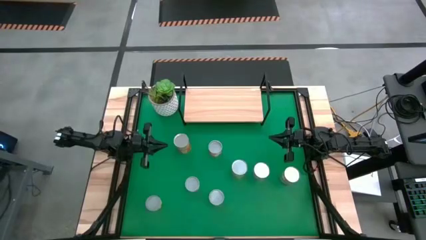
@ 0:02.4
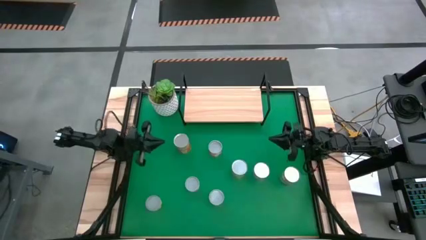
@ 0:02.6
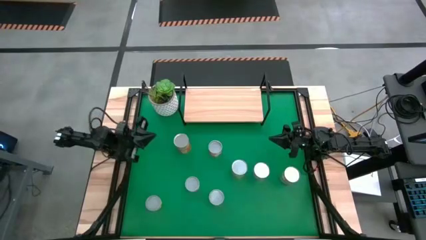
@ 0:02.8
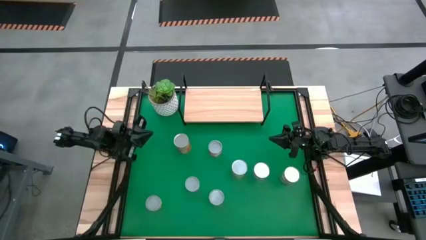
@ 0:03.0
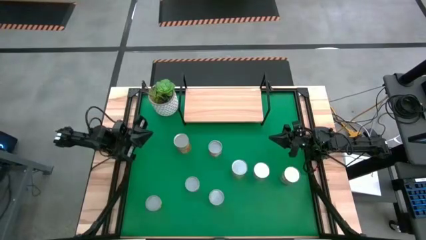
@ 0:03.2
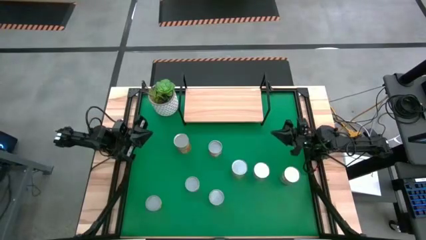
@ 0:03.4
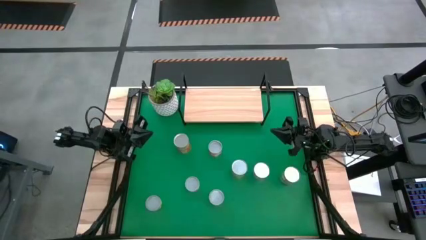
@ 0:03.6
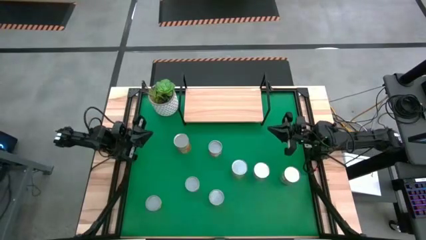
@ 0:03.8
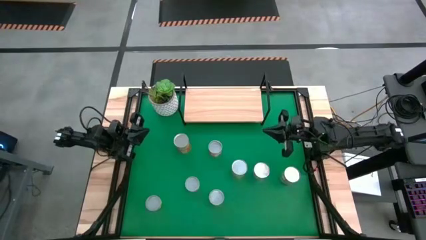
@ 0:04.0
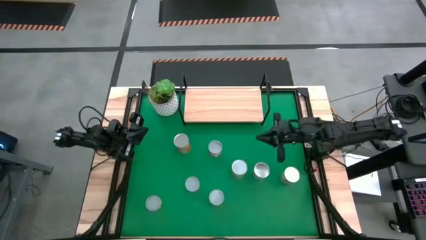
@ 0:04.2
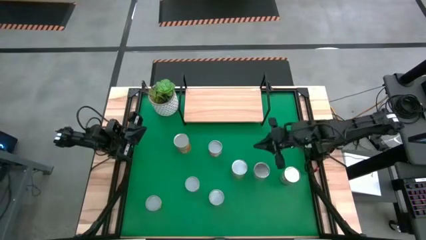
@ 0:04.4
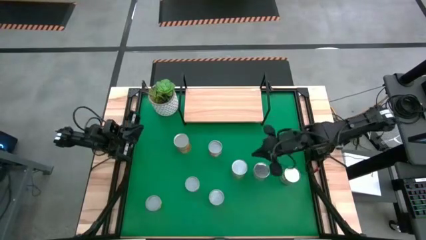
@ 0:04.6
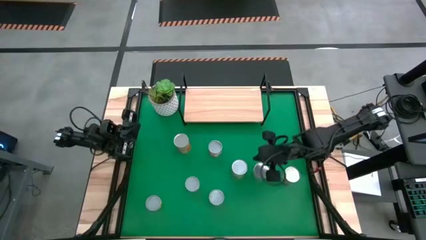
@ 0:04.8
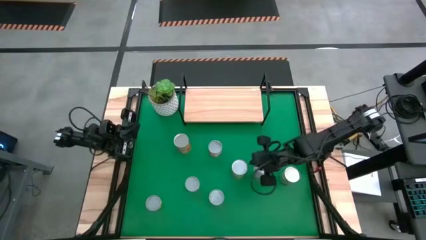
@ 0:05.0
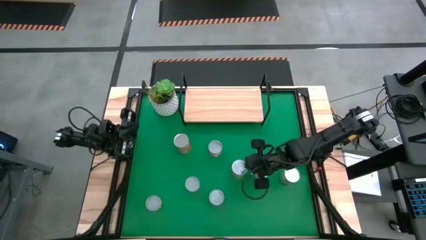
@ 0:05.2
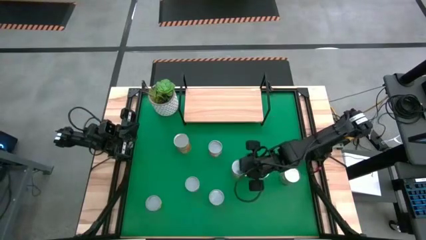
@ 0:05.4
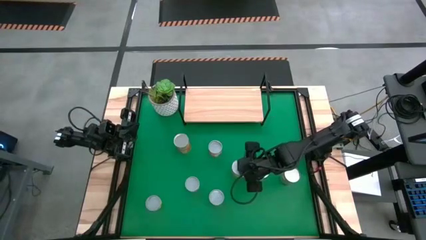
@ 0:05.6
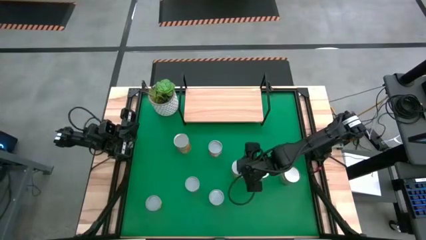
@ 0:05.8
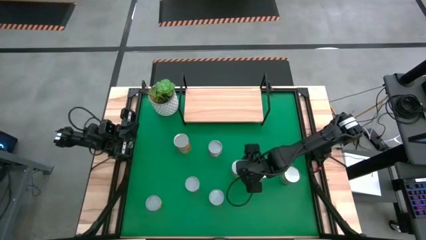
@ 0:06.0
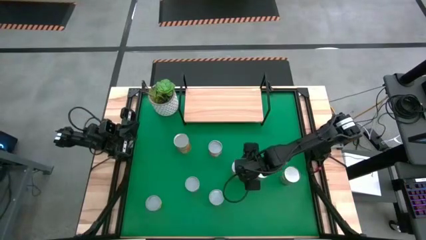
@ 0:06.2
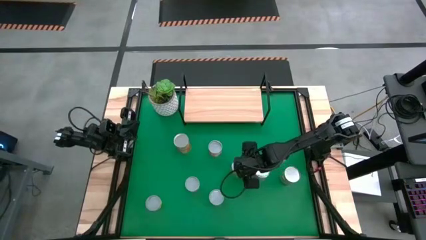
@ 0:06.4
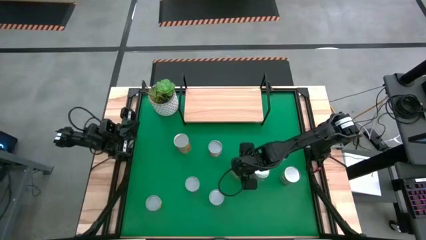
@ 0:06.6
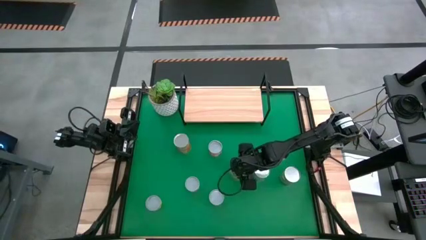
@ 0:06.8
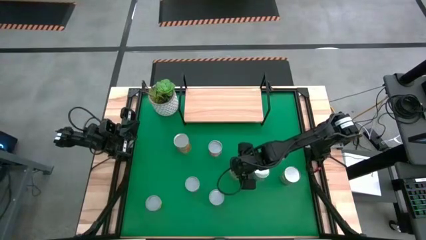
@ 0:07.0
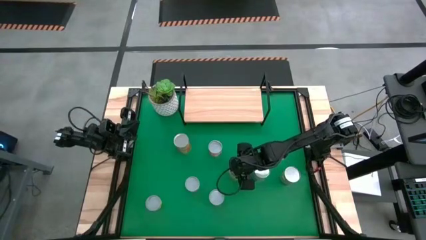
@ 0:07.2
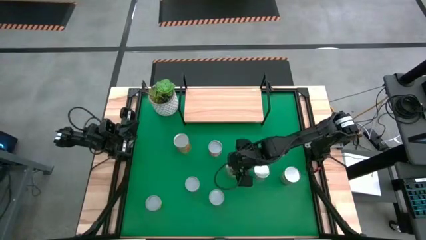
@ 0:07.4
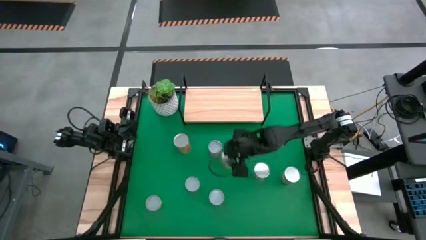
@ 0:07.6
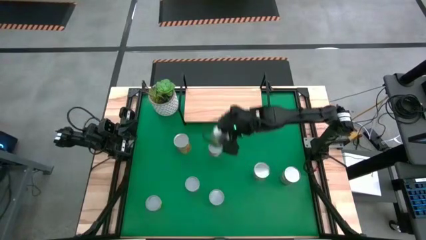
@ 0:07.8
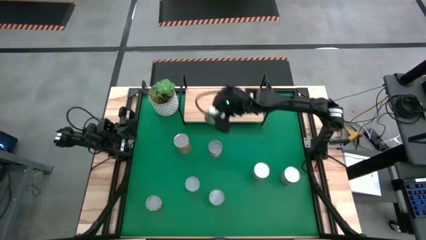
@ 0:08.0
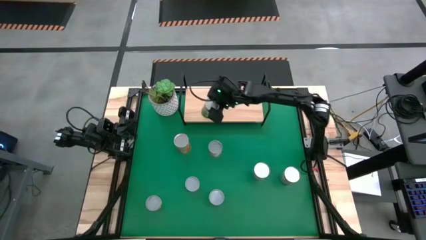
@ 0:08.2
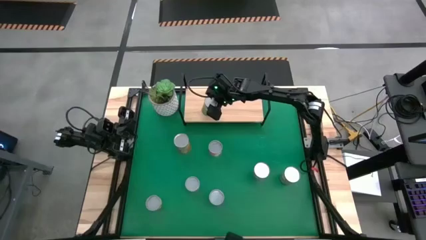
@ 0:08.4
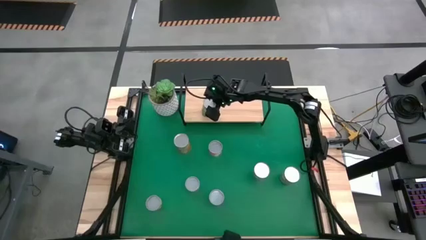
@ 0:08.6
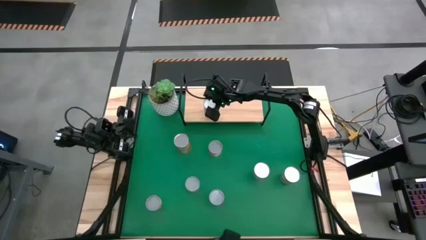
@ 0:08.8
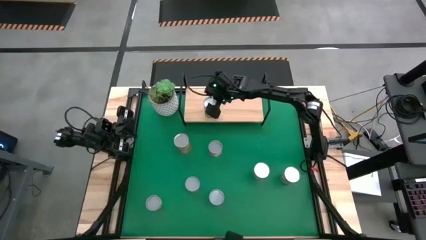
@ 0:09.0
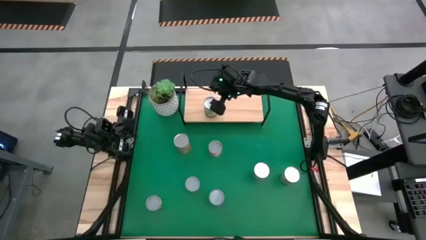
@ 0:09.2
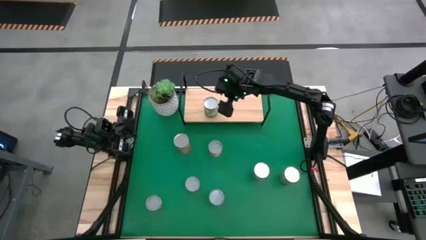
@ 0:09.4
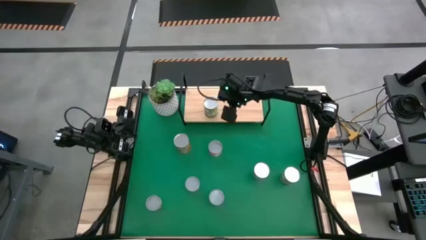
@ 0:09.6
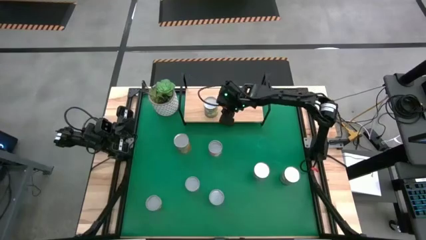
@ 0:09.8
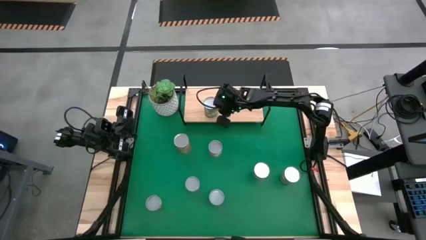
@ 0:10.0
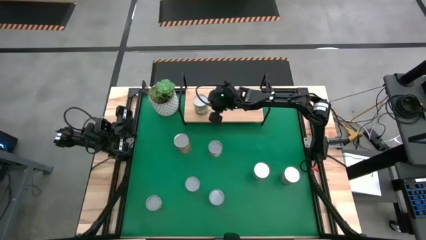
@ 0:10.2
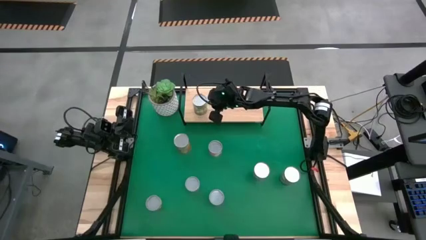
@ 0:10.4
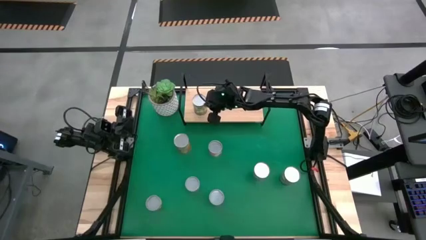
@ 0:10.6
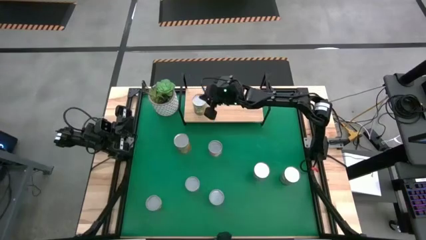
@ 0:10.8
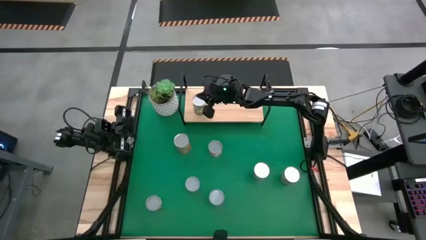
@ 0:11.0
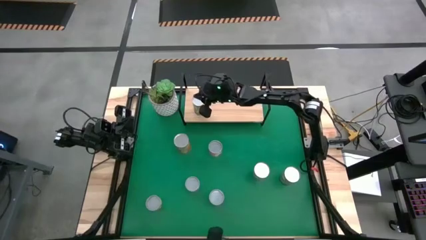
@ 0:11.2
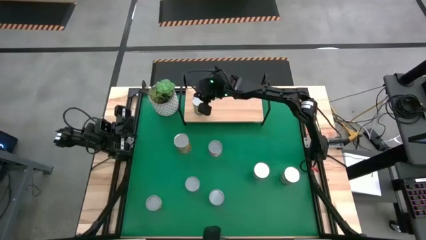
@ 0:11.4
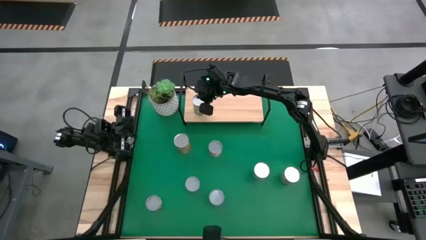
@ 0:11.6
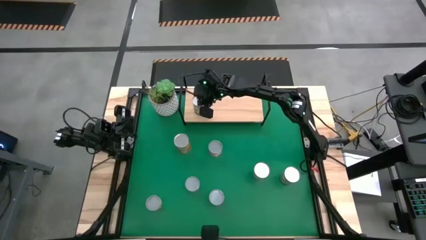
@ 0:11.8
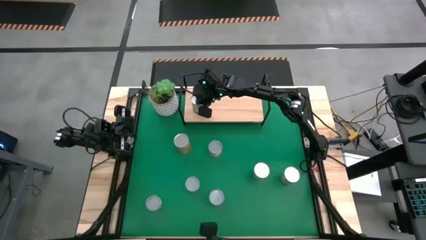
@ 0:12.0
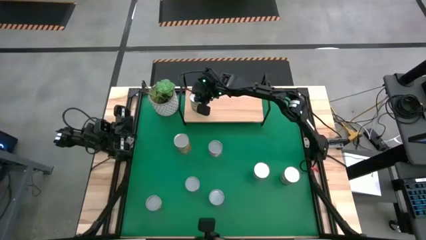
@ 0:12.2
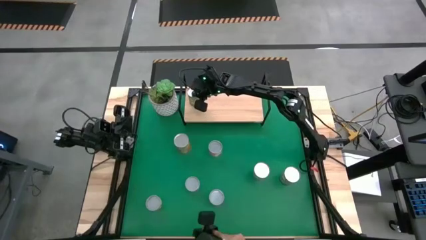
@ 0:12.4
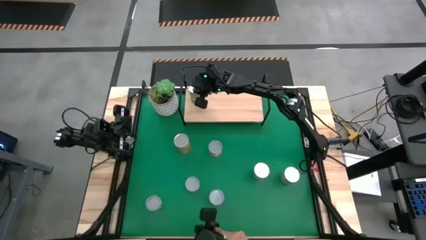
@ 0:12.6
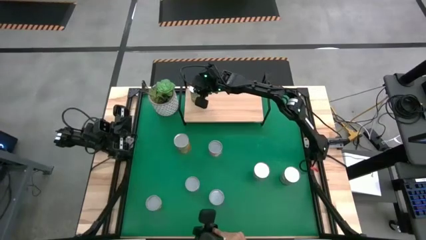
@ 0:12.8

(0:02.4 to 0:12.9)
Task: Pick and place cans onto a shelf
Put the canned pears on the shelf
